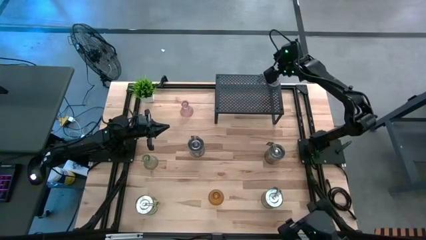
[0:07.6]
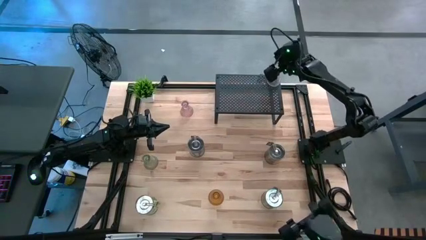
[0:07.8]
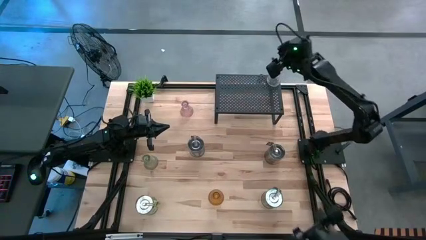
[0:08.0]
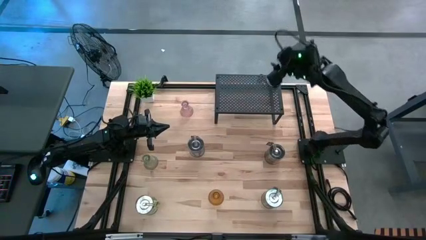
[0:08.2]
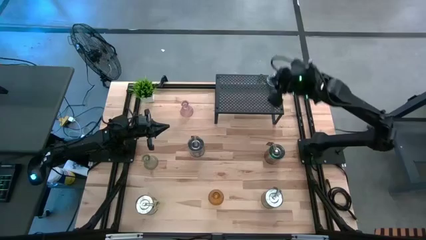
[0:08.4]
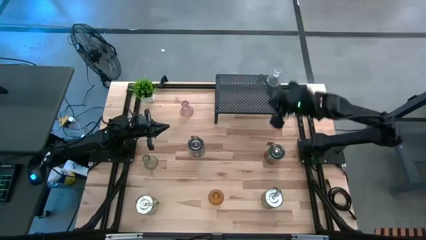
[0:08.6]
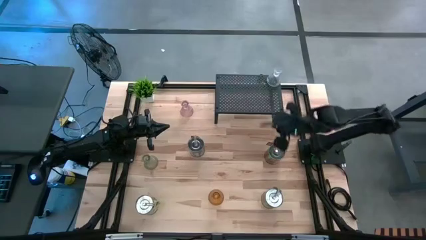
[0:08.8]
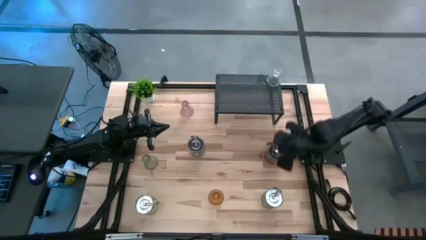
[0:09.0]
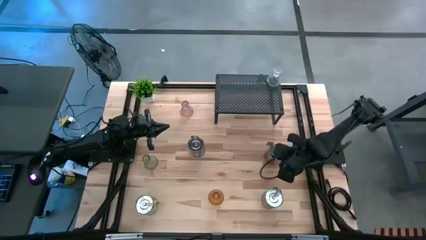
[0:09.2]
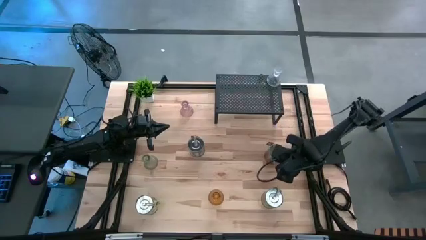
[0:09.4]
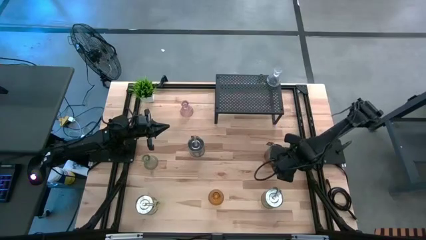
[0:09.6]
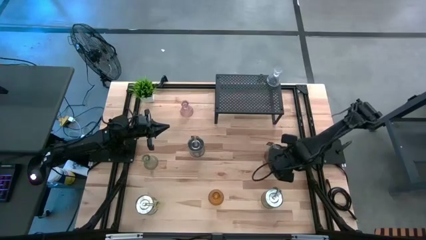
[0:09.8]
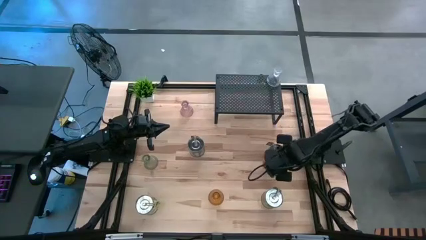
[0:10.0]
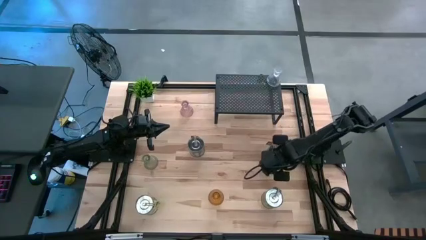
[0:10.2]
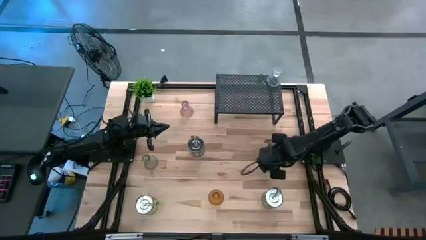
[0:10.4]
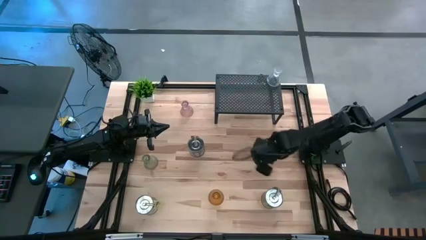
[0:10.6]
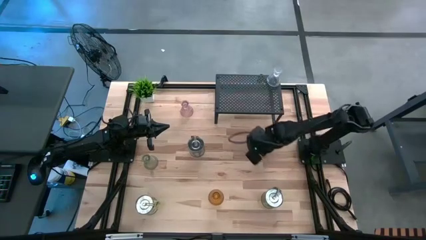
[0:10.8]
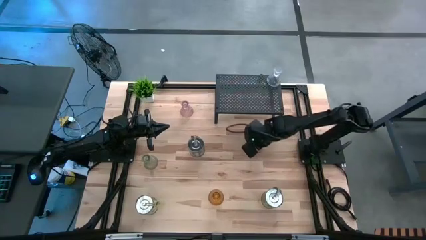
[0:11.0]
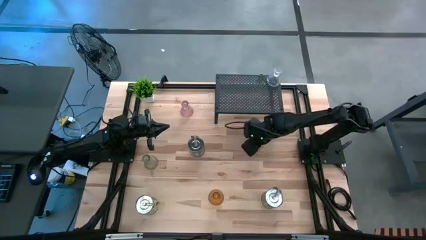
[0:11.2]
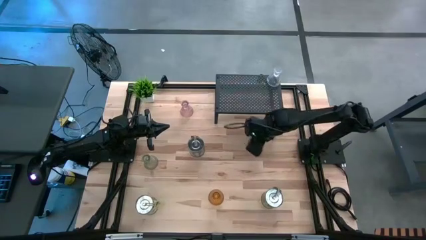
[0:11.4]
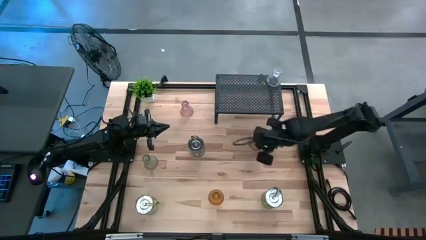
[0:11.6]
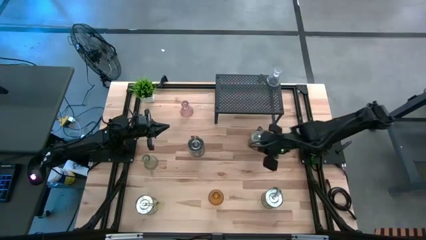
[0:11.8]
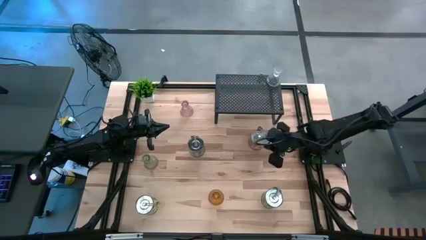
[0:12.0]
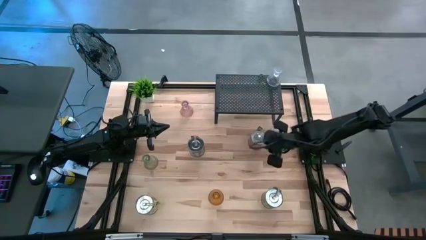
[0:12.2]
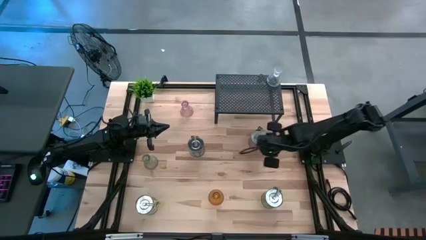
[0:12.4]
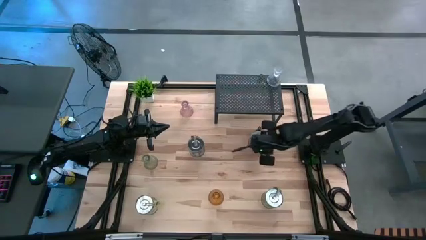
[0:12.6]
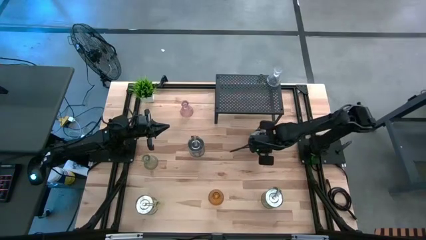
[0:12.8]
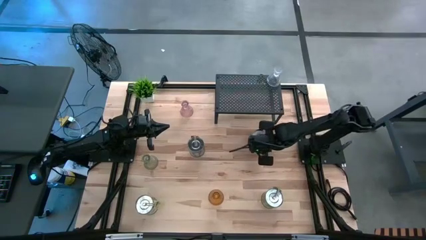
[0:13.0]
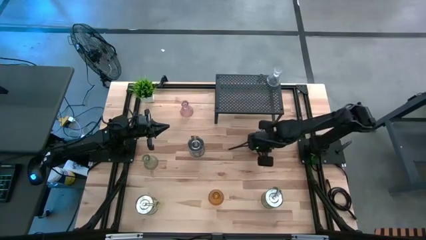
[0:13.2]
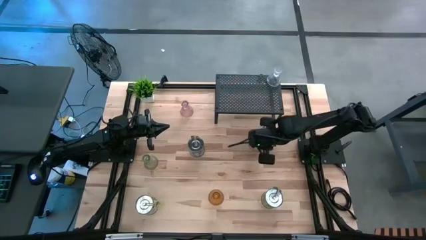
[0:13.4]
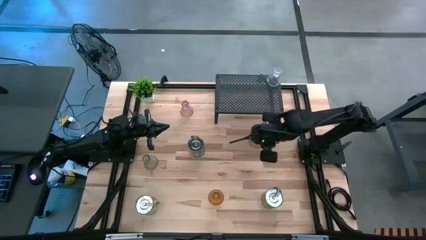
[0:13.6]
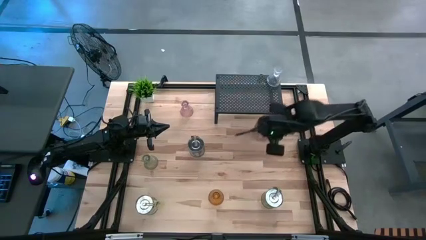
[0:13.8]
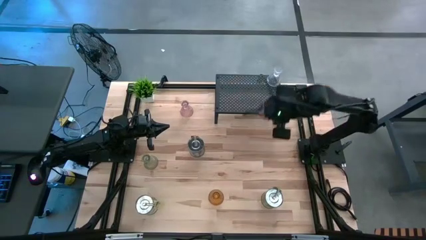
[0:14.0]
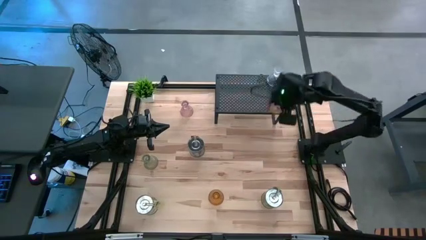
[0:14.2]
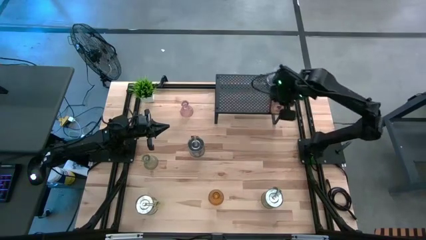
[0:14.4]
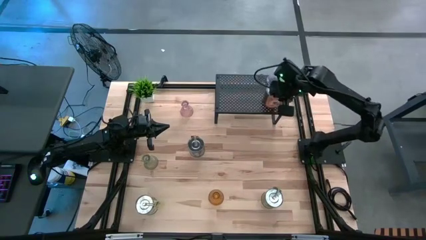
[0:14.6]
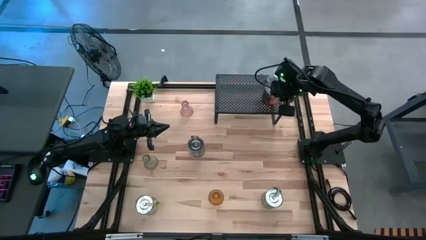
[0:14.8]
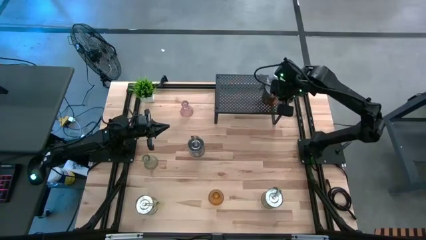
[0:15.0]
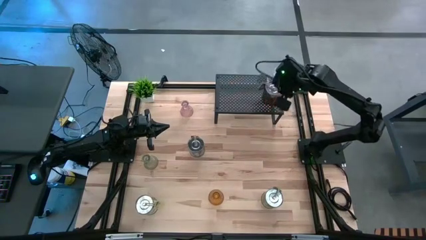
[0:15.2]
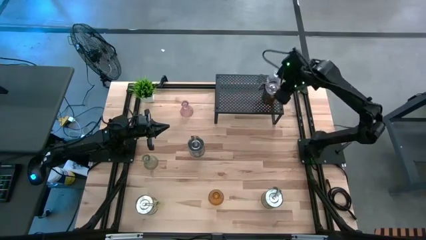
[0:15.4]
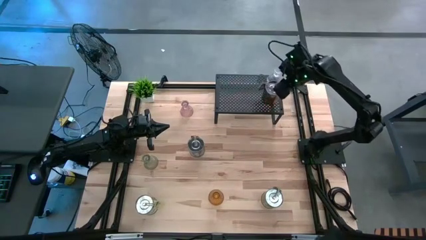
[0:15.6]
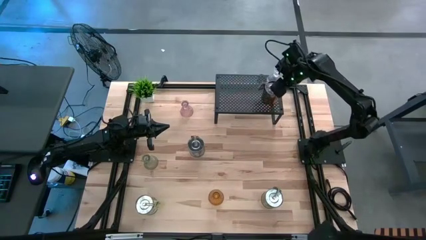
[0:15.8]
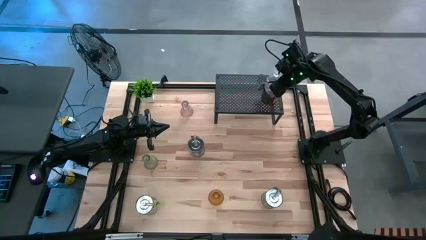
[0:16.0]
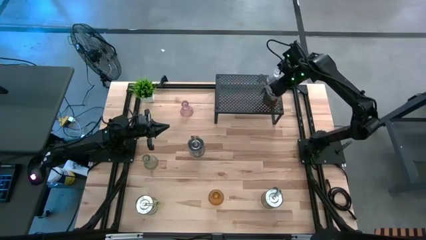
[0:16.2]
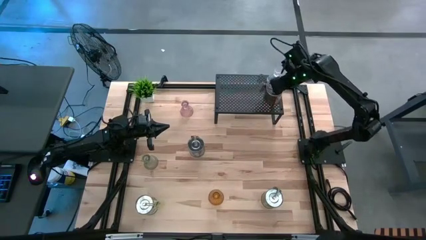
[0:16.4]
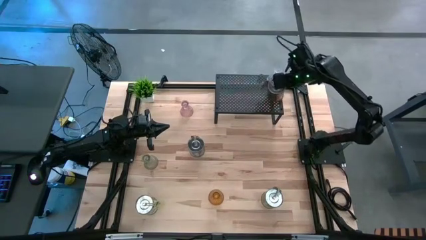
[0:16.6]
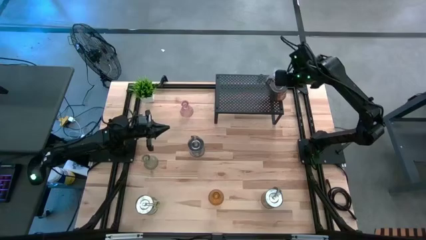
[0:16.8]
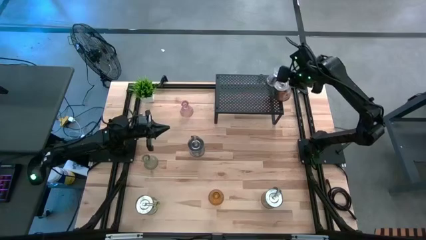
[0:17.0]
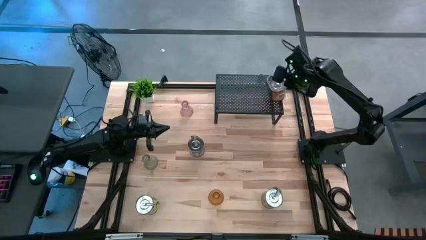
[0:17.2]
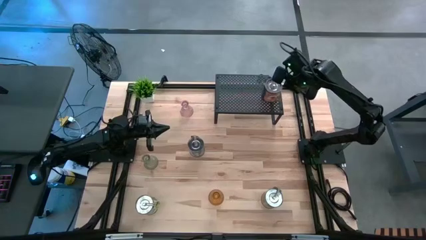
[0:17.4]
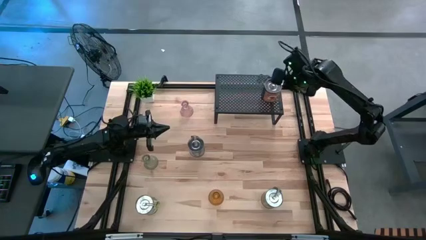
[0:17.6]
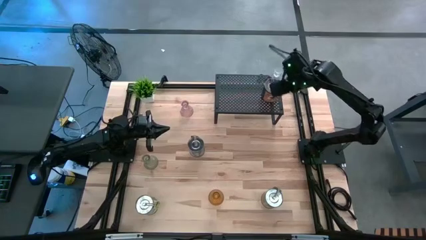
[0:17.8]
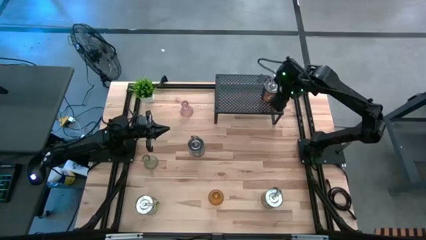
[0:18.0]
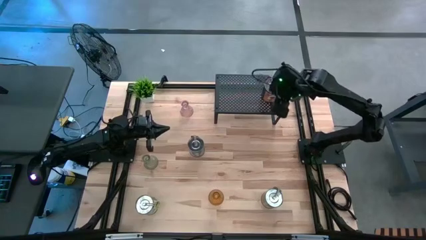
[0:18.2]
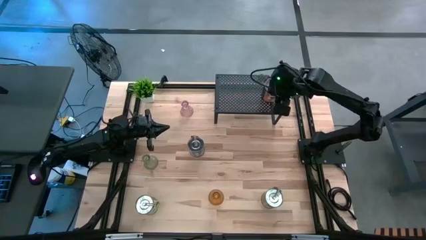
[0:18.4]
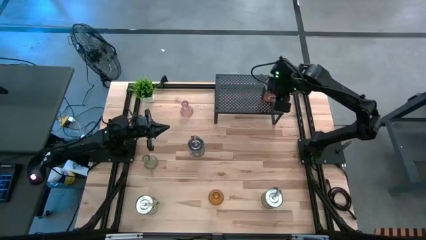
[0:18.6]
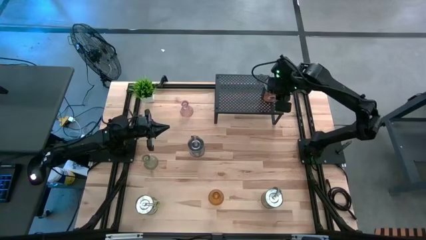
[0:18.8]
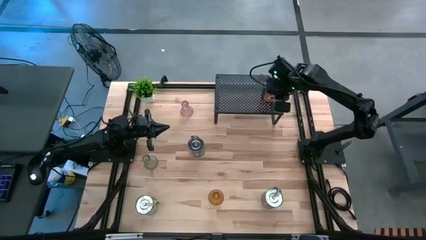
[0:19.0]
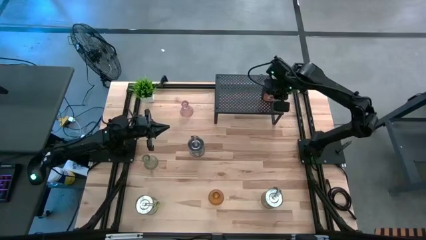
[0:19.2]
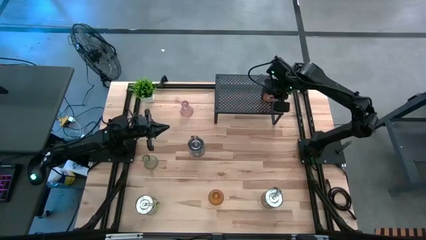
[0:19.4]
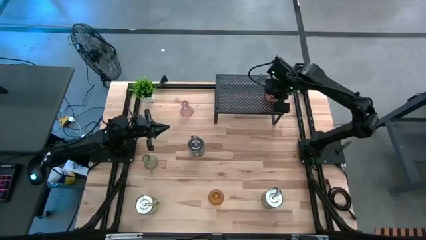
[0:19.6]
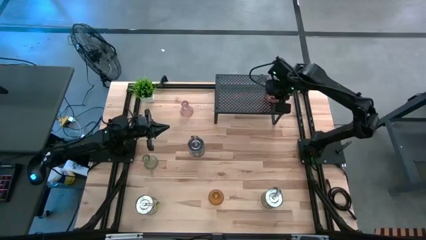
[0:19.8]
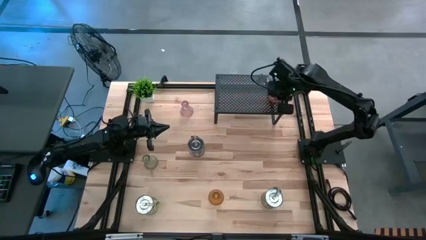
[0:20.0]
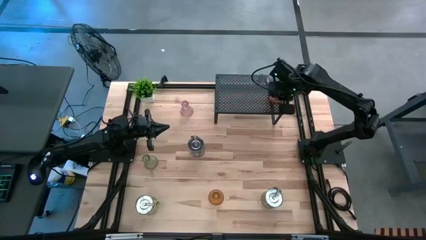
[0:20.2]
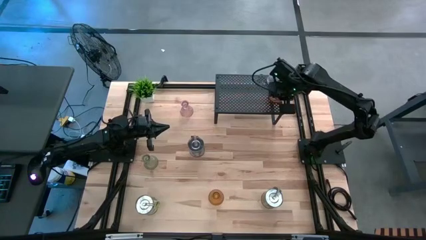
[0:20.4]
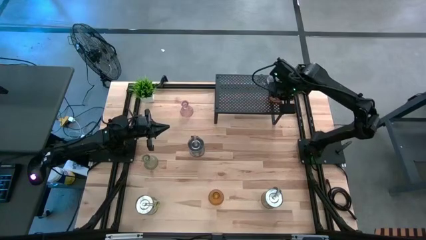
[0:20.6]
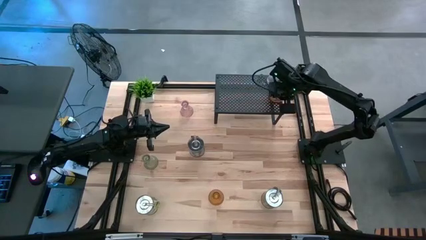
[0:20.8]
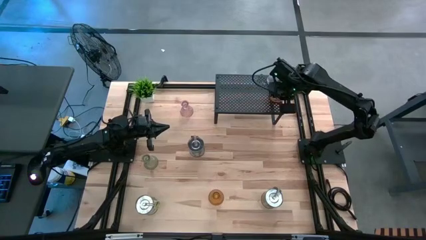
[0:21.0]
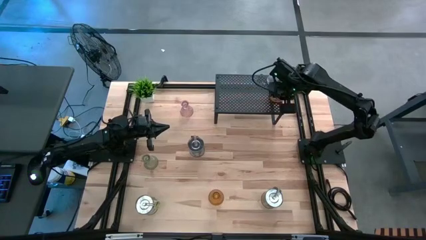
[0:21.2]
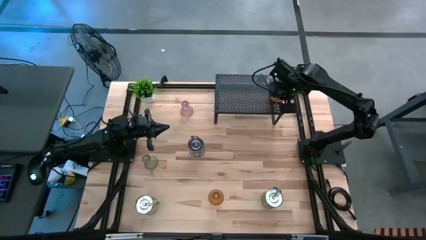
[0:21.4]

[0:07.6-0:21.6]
Task: Pick & Place candle stick holders
Put the orange scented candle on the shelf
